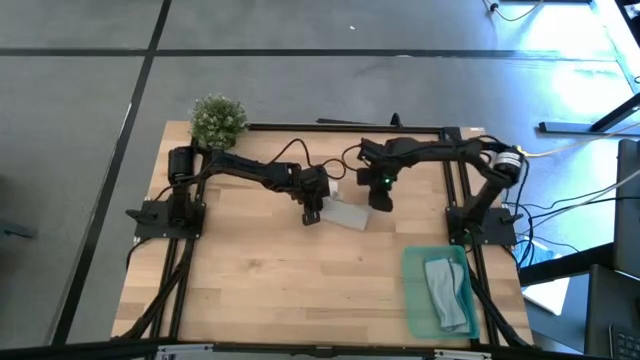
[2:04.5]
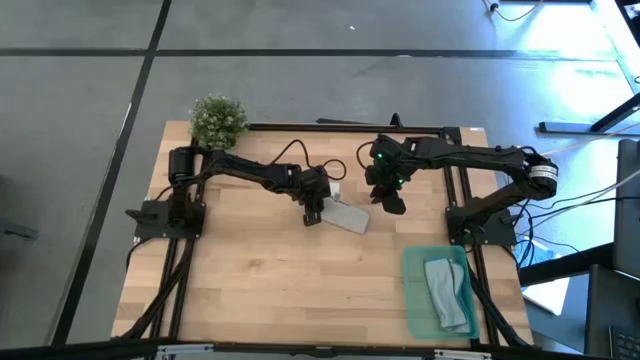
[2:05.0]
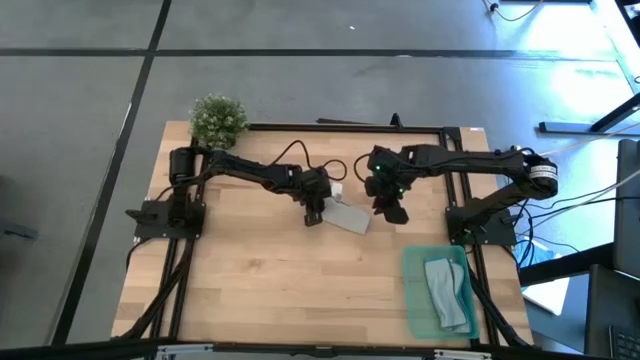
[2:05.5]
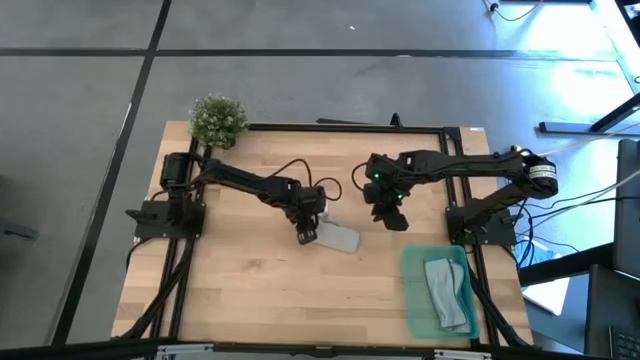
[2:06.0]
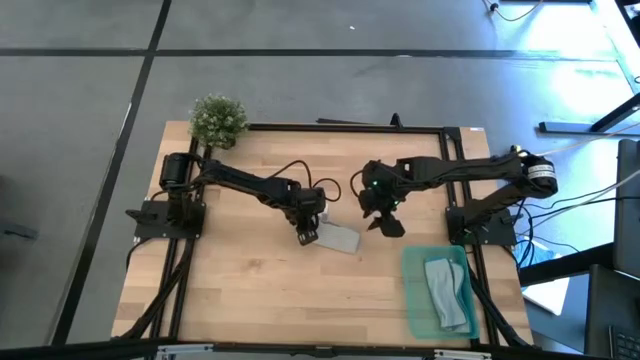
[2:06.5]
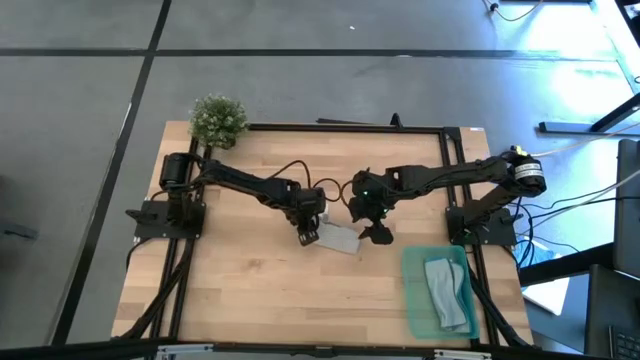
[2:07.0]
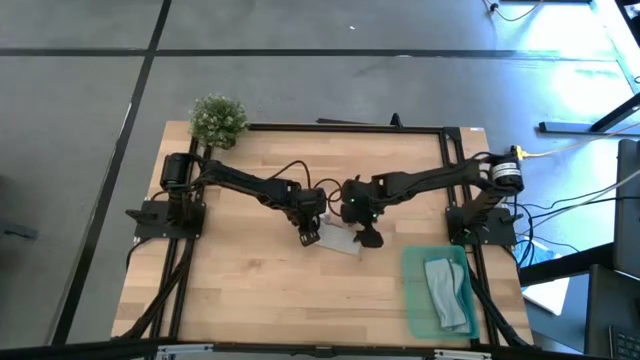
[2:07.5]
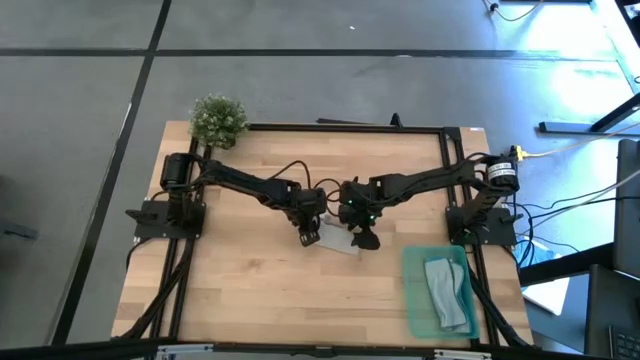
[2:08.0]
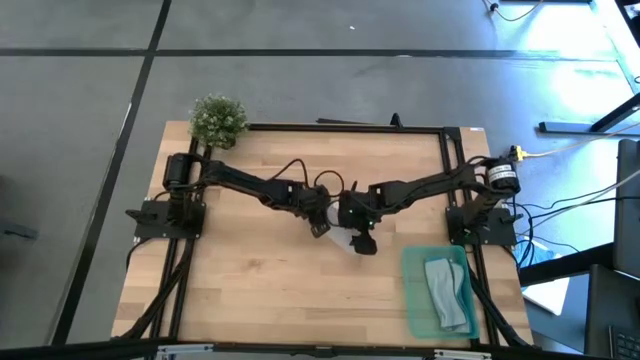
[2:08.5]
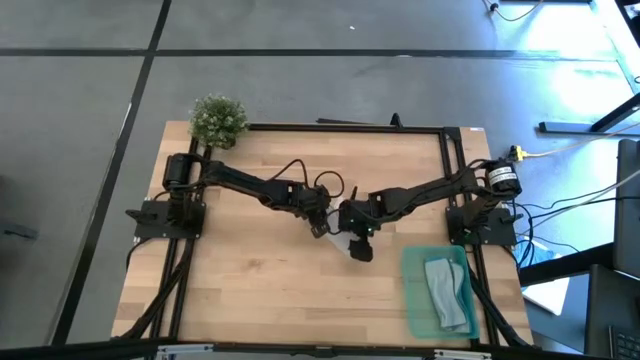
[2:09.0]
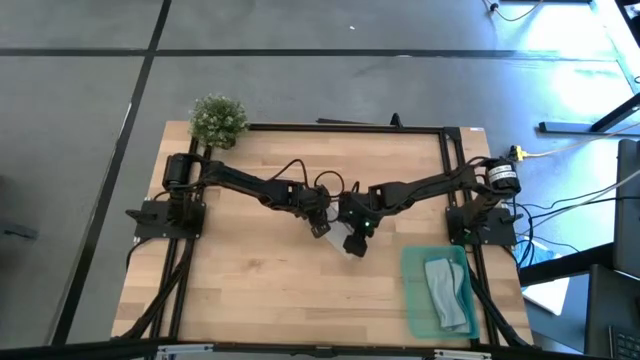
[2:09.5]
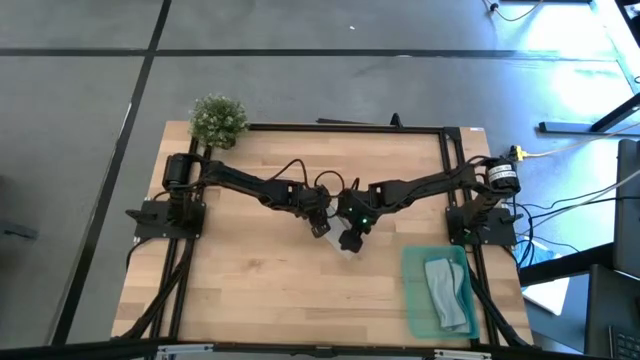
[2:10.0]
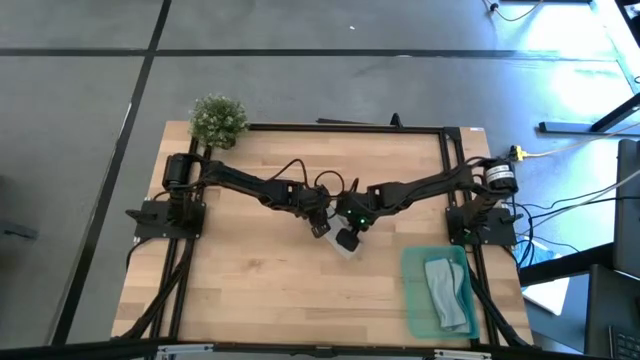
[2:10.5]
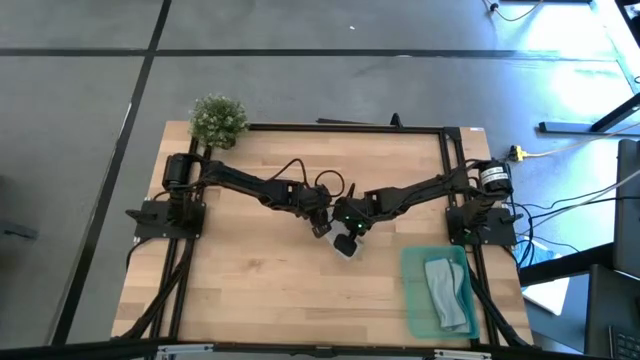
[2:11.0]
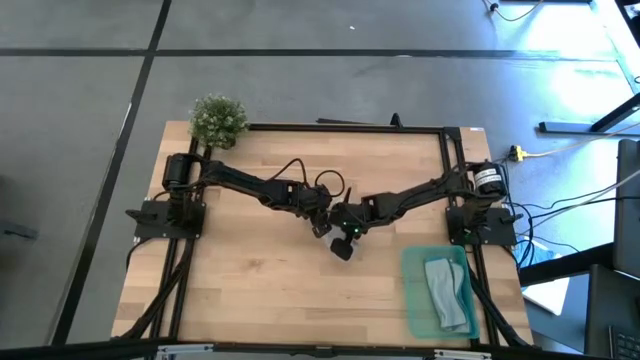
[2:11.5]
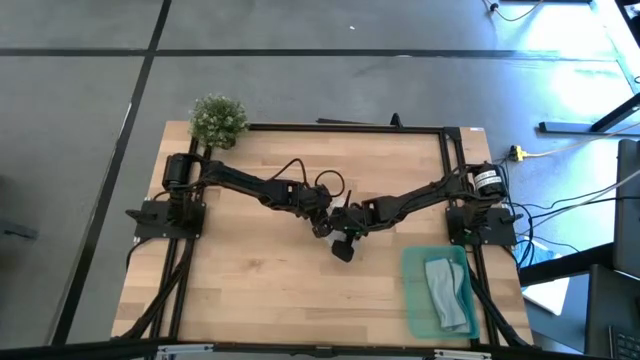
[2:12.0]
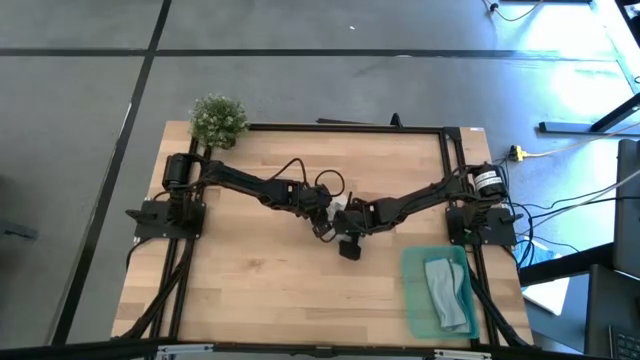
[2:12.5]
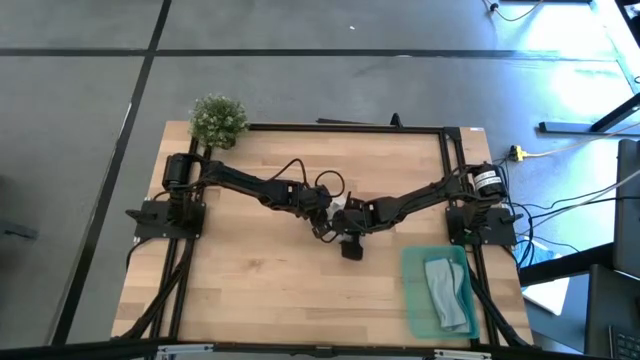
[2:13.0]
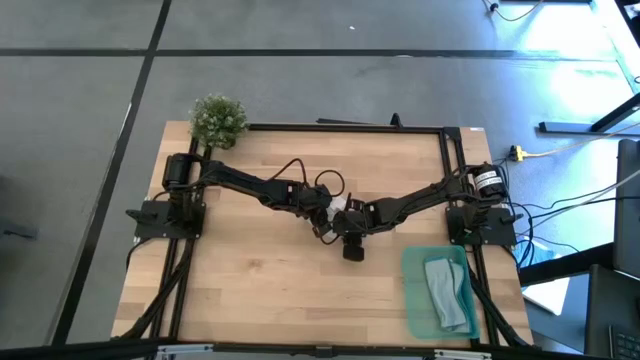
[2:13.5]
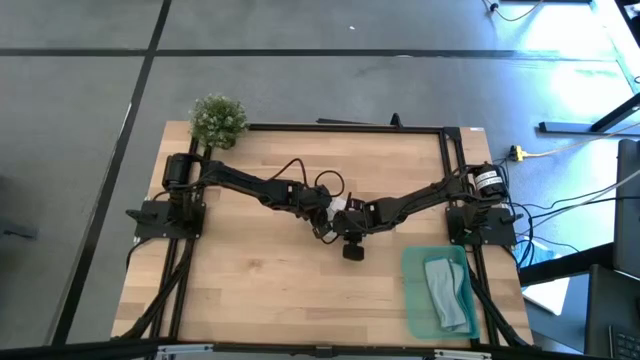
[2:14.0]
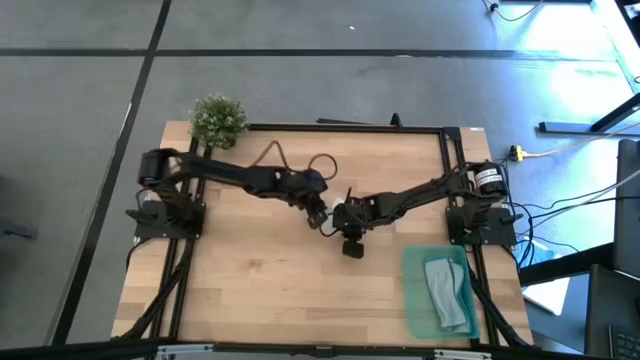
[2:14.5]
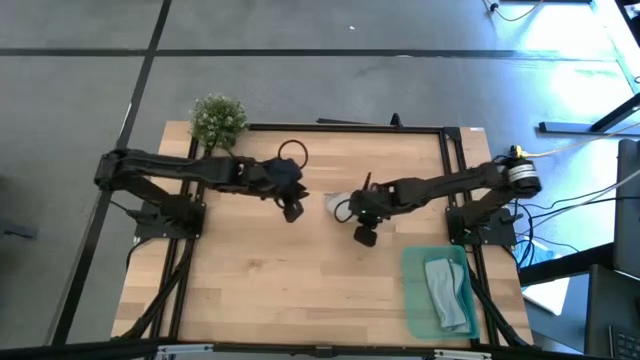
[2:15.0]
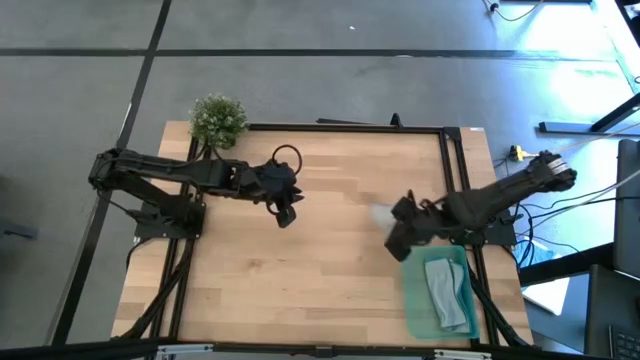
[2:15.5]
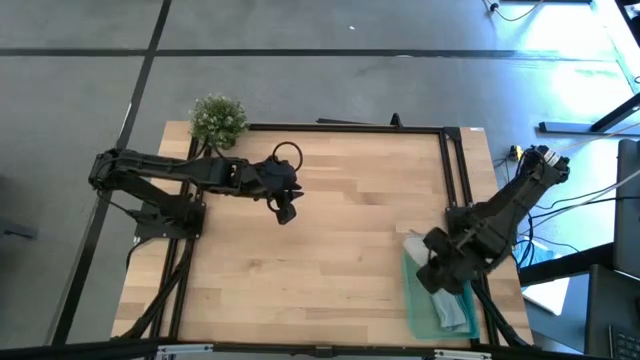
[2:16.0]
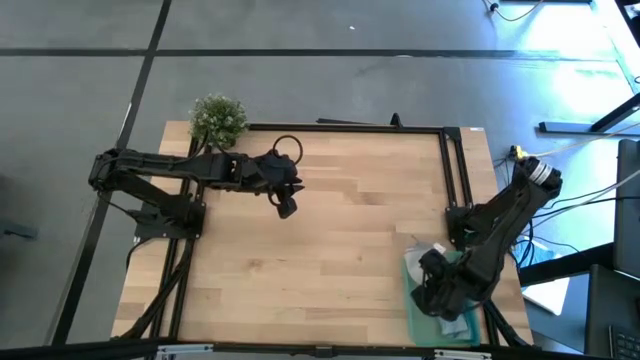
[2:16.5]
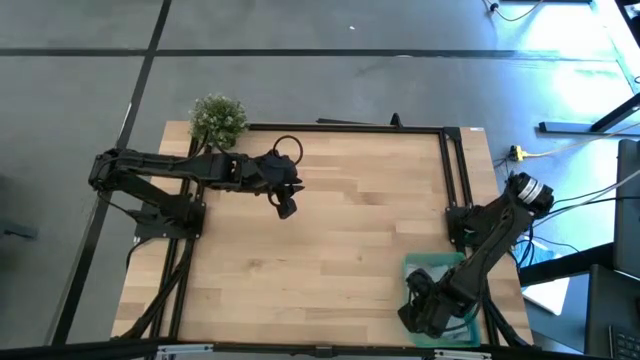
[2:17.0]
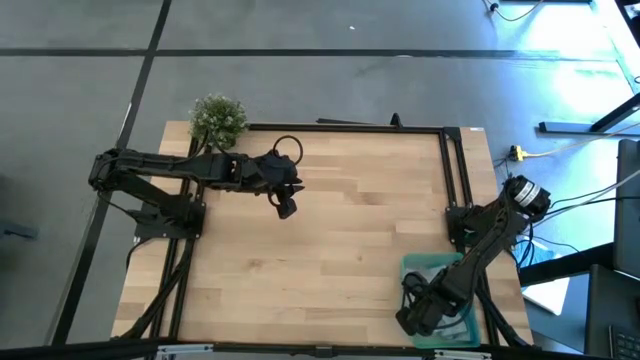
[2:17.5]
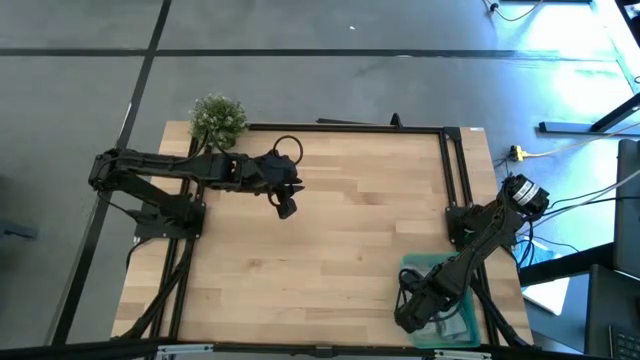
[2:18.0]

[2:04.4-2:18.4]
Task: Roll microfiber towels into tight, uniform cylinder then place into a basket
Put the rolled gray towel into the green bin

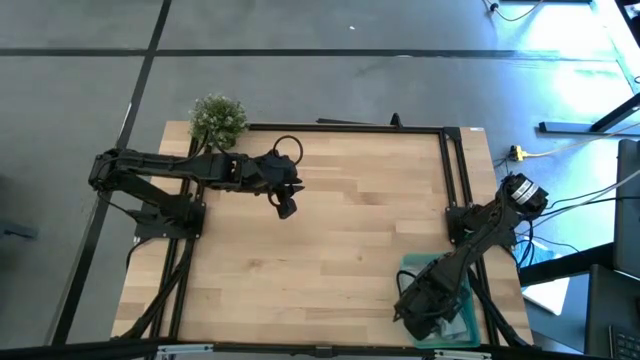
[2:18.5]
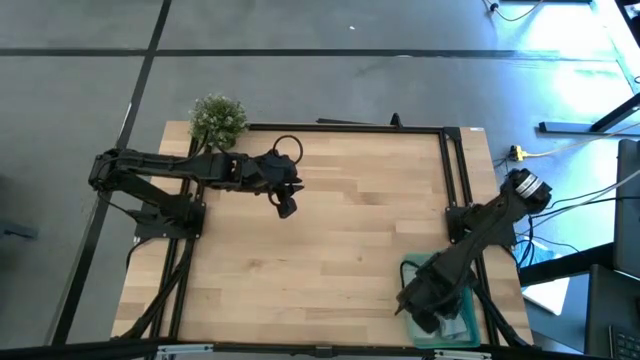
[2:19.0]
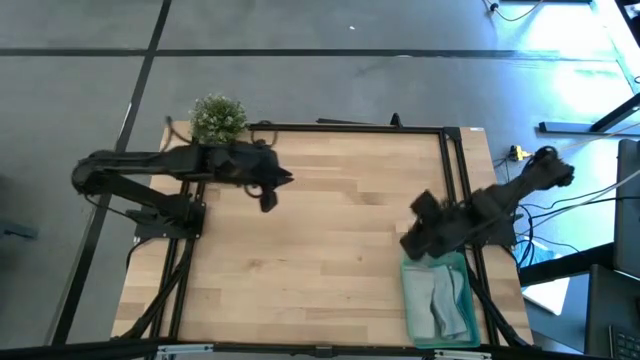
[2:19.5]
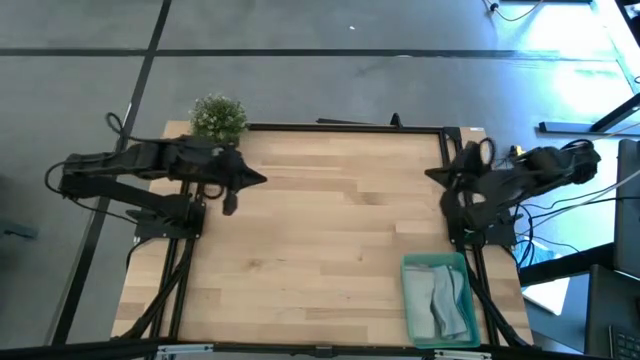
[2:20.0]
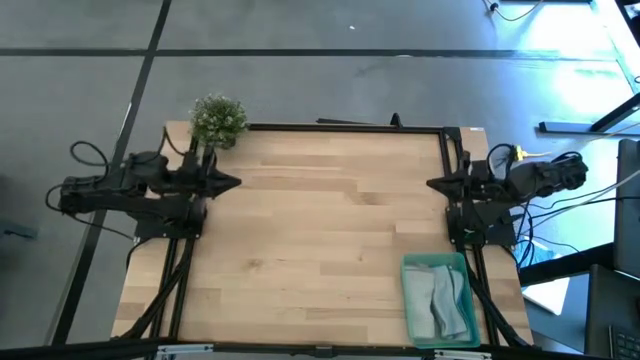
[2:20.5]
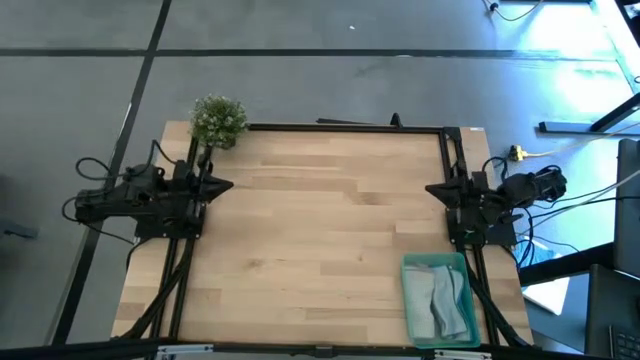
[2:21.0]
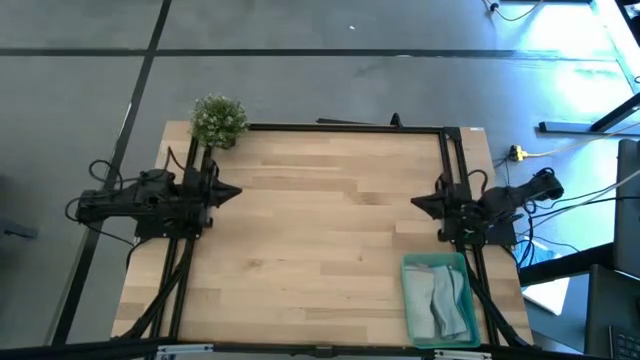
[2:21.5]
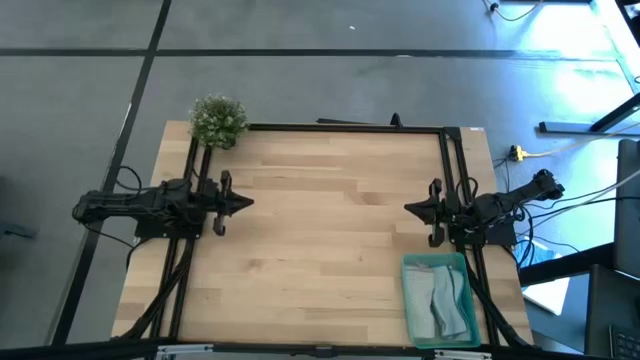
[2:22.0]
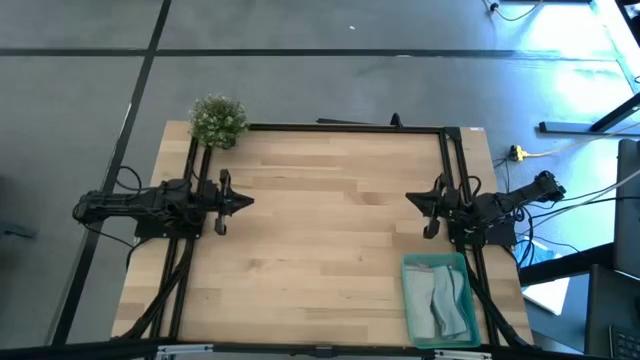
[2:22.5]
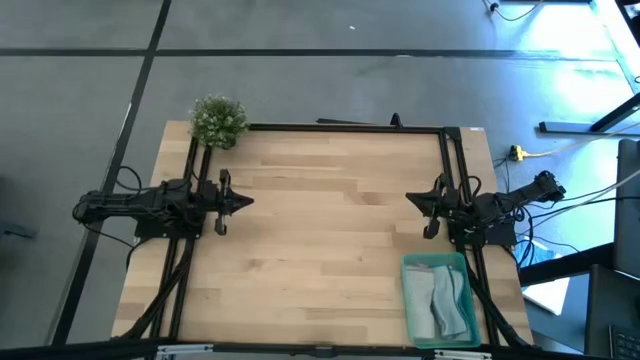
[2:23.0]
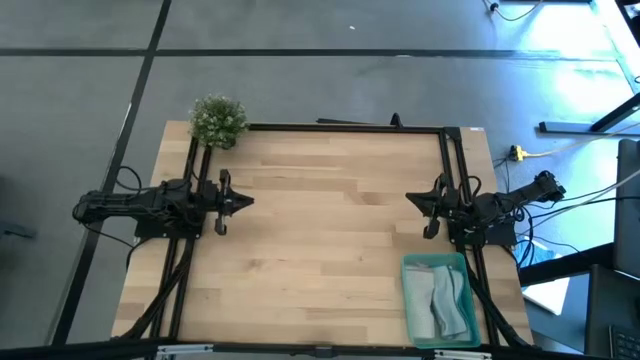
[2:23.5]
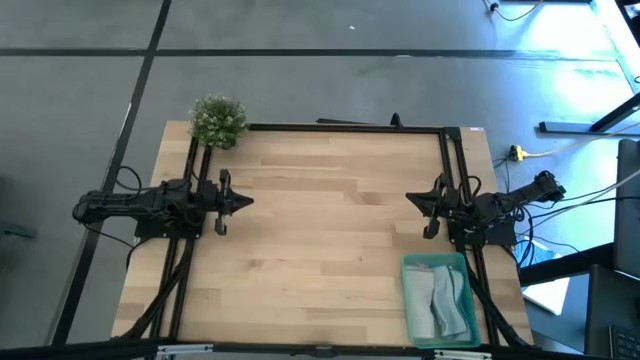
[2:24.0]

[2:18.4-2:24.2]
Return to Home Position

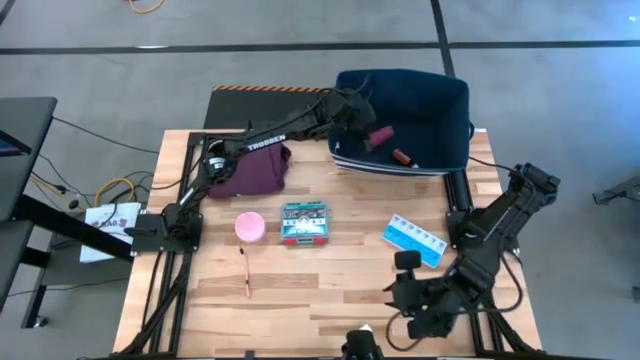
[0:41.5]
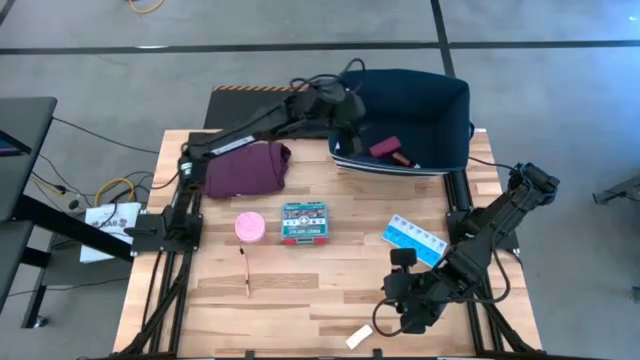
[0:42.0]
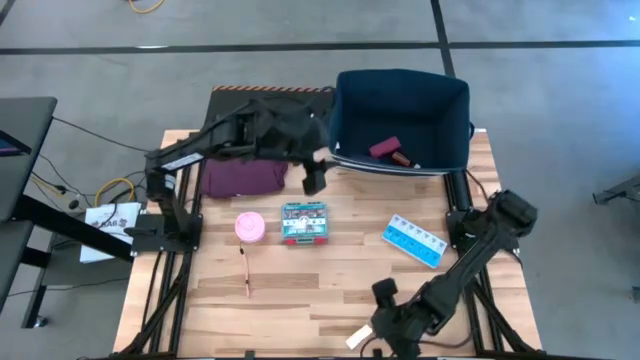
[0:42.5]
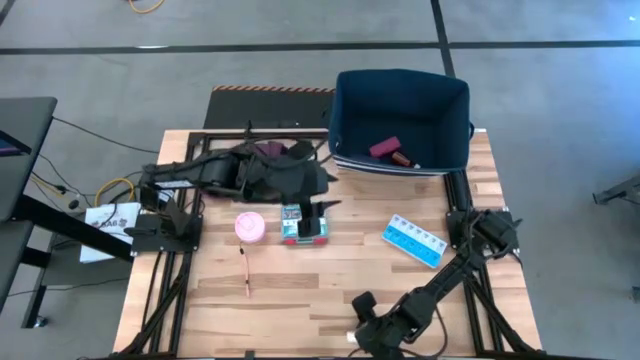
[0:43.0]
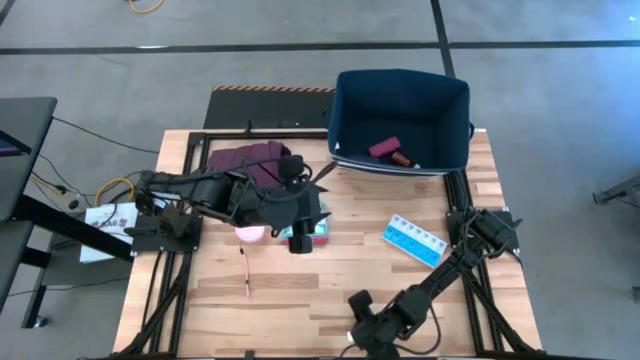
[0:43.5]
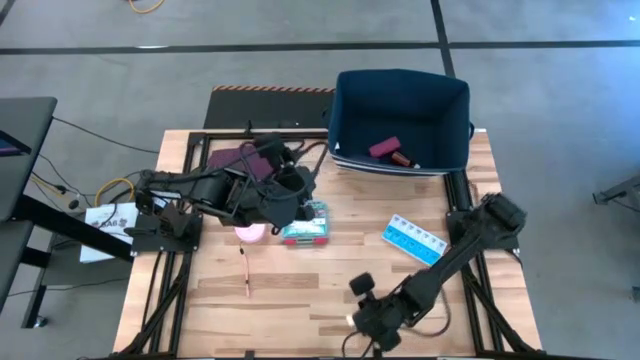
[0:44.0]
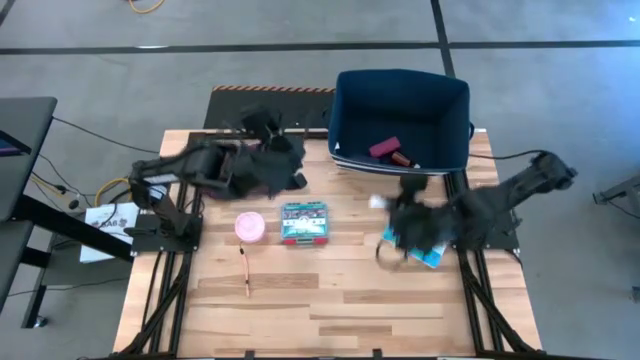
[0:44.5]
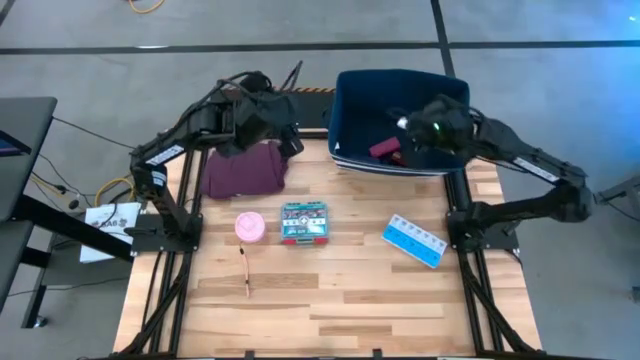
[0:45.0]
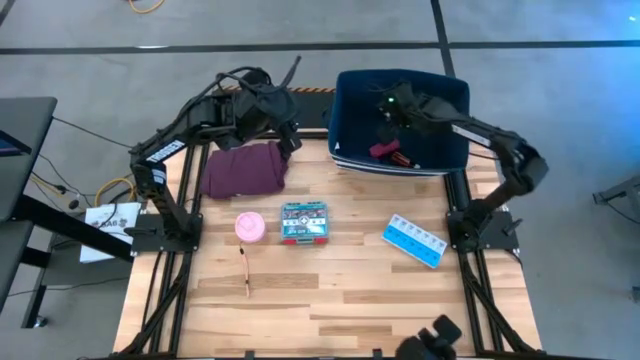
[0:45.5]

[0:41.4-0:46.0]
Task: Pick & place medical supplies in basket/bin
Put the white rolled gauze into the blue bin
